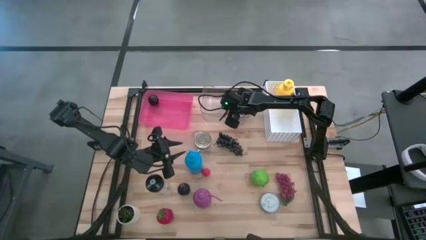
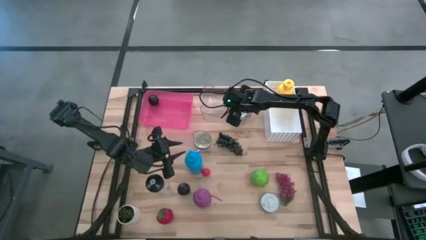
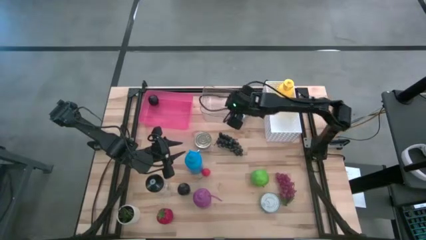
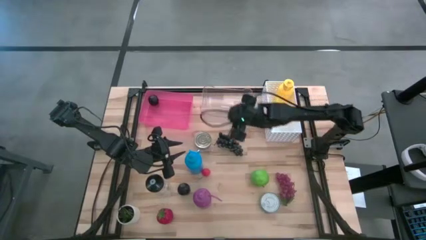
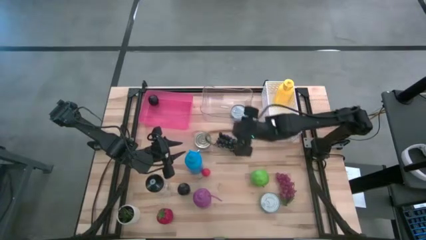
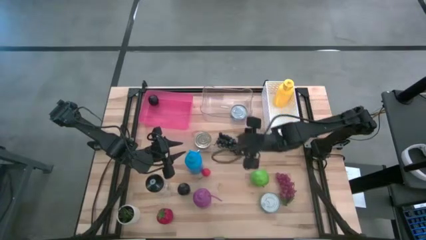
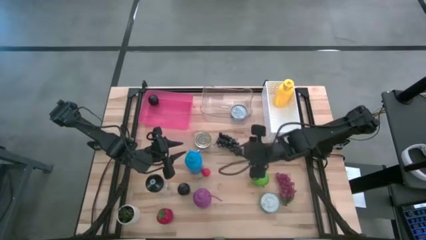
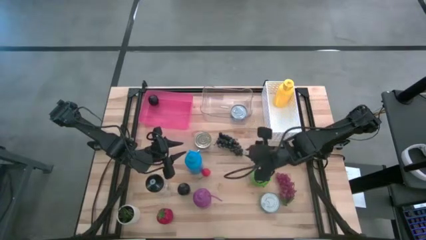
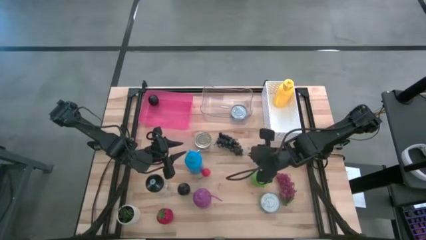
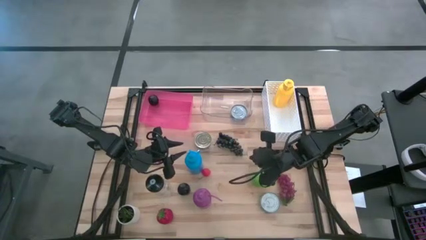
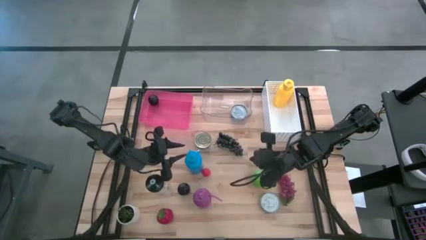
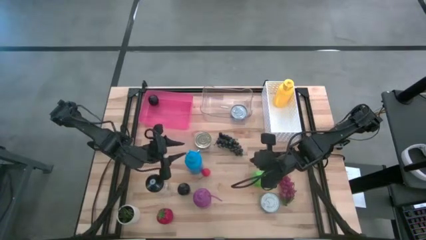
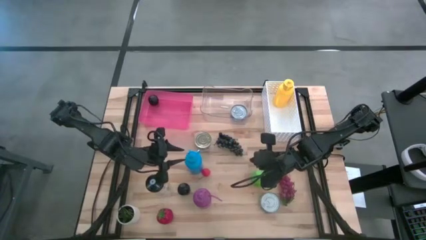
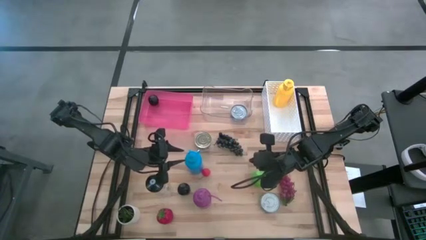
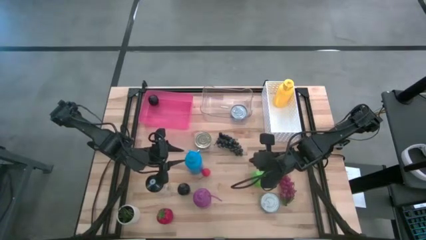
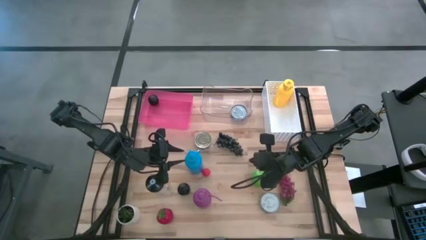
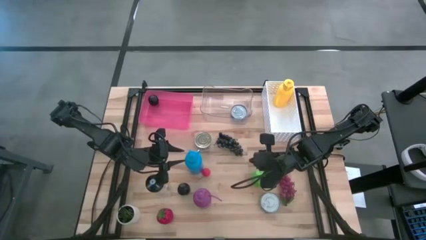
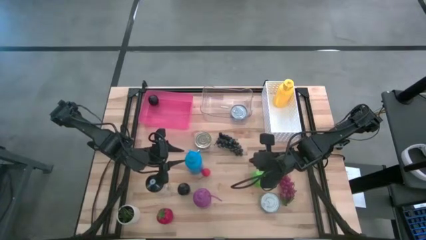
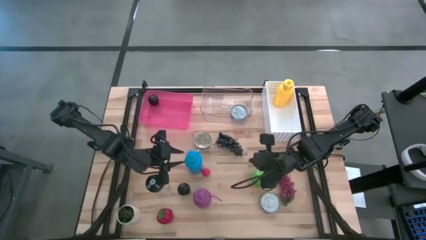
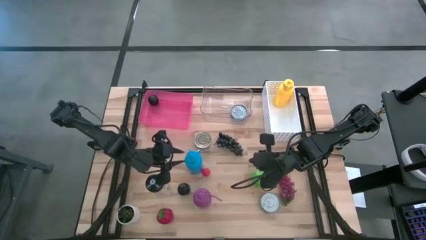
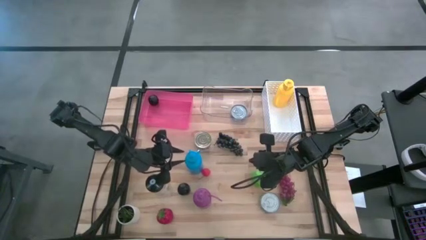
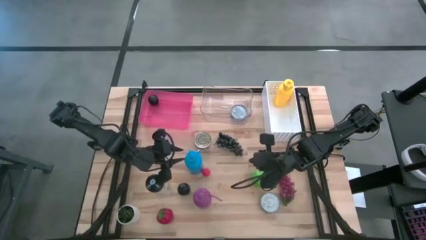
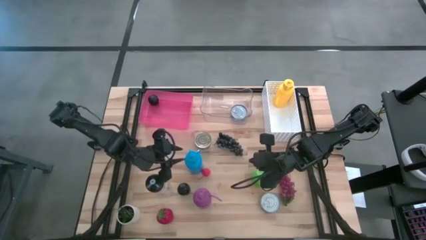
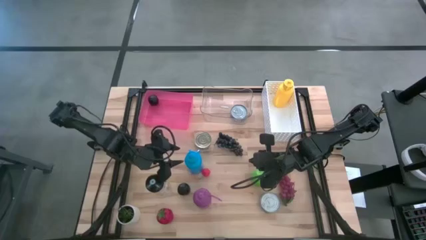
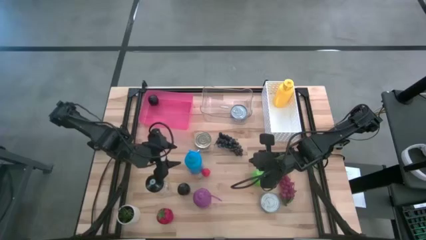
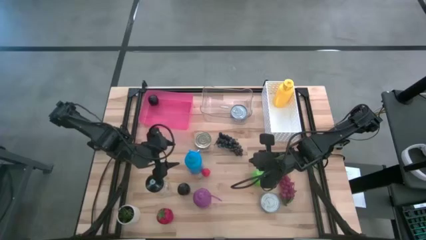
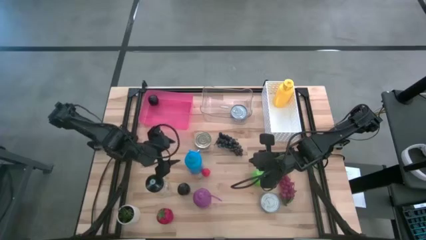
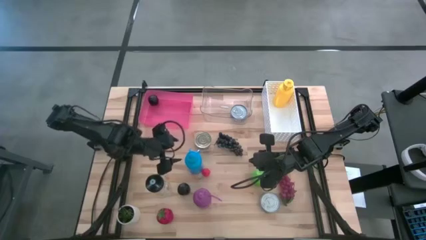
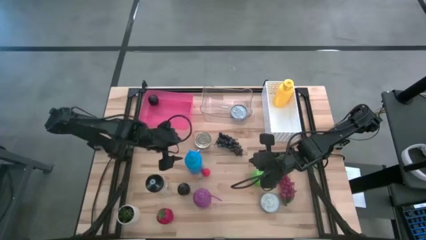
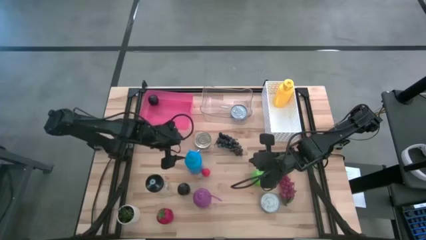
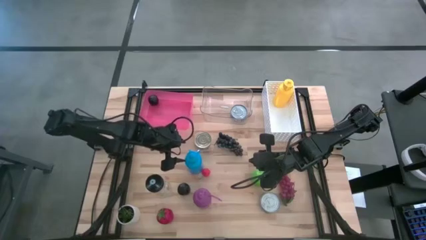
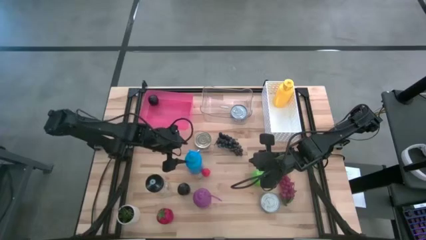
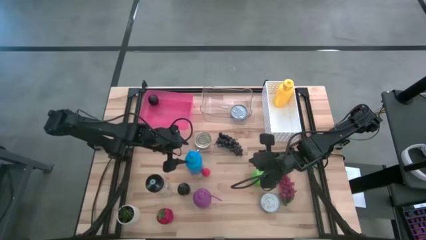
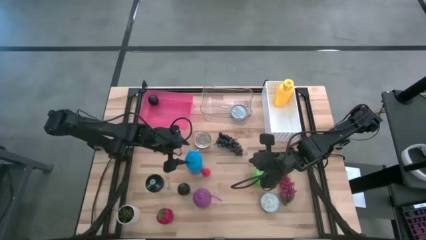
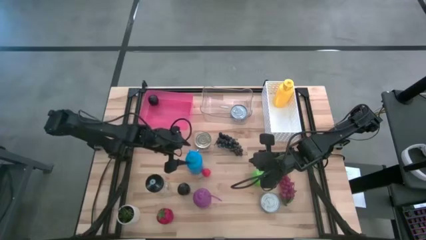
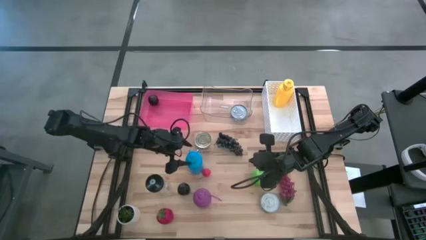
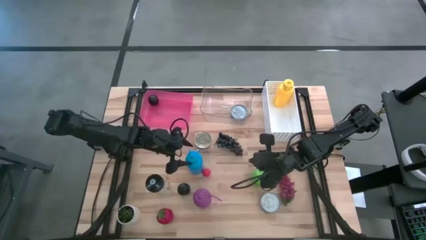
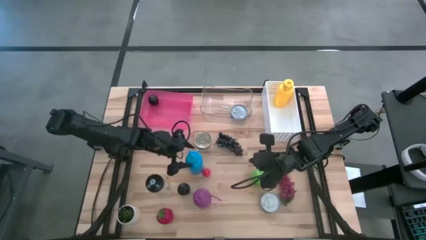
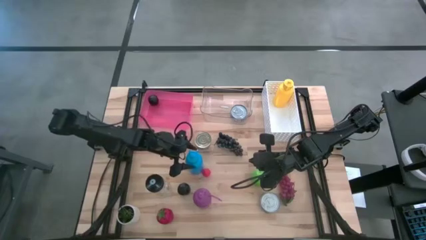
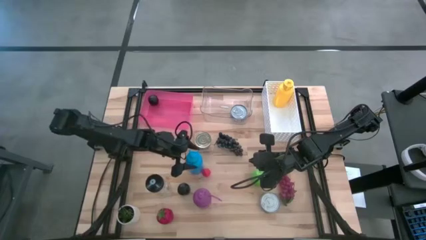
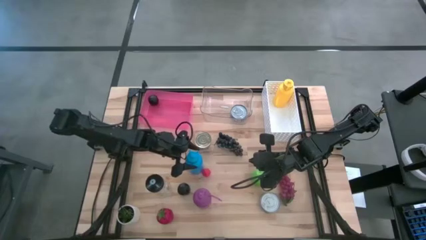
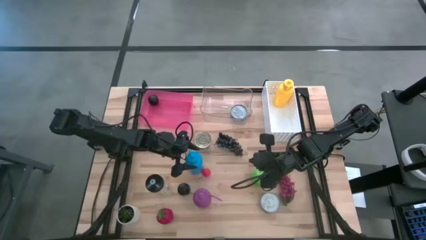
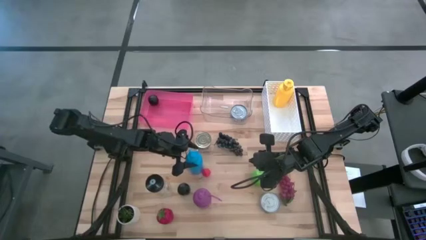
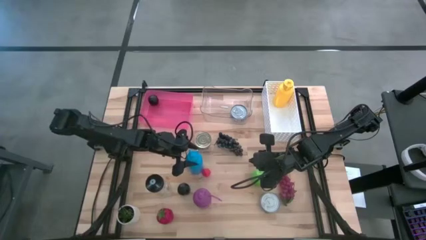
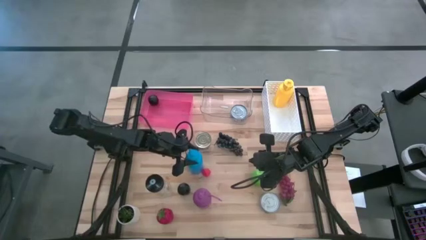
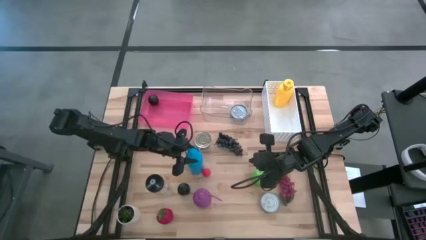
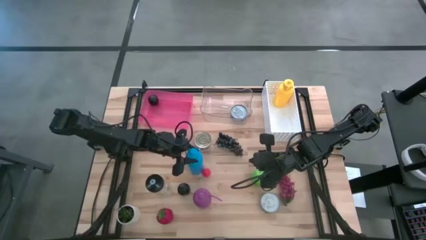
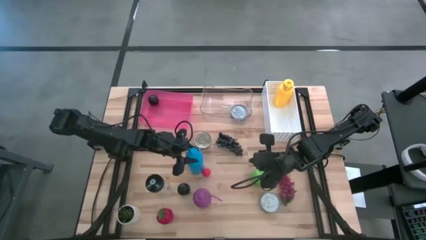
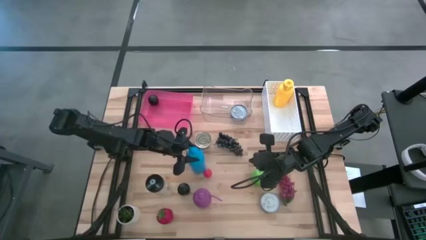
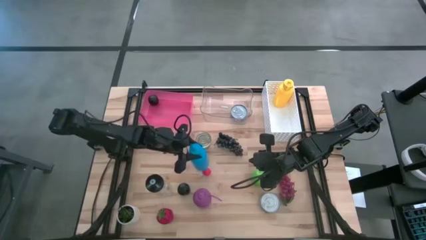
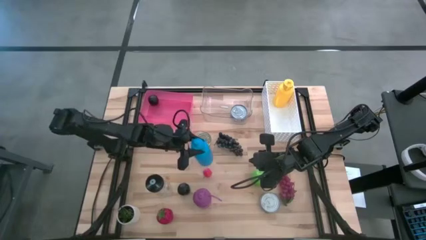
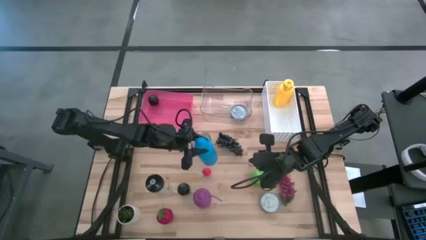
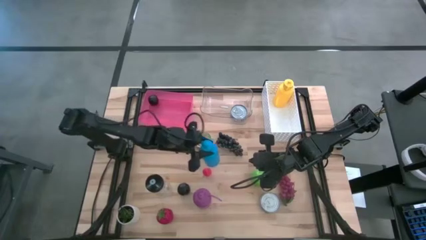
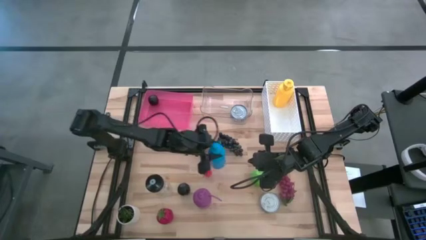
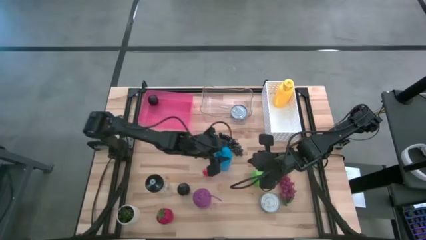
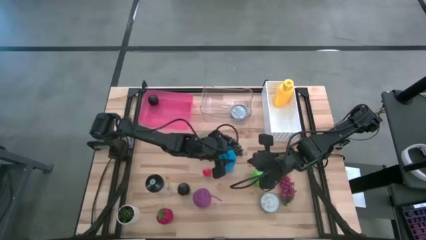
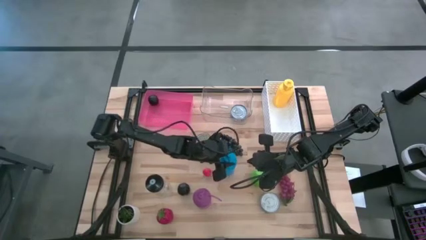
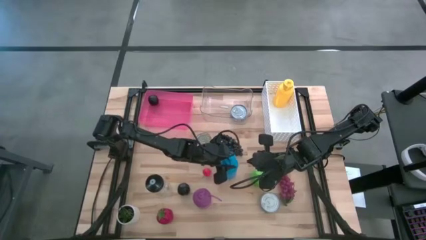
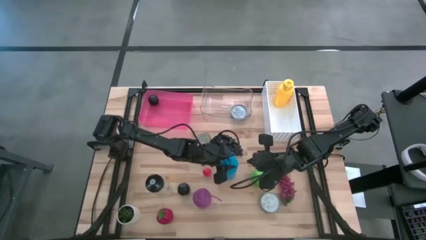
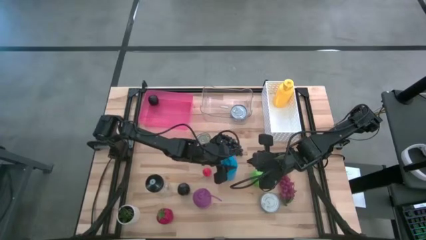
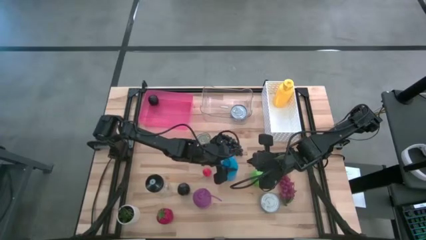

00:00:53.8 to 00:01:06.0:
Task: Pick & Place Food Item
Put the blue water bottle into the white bin
